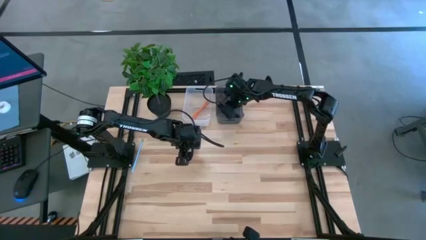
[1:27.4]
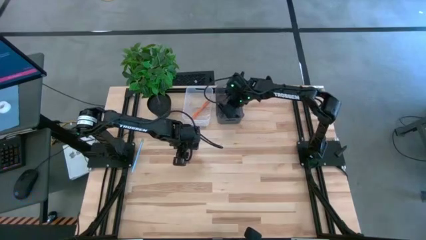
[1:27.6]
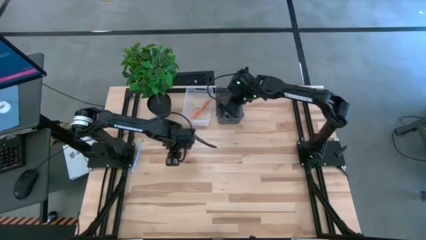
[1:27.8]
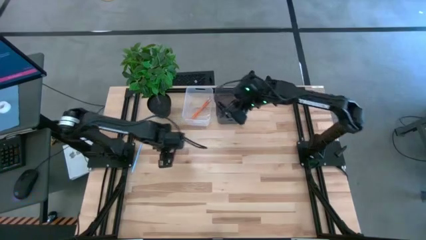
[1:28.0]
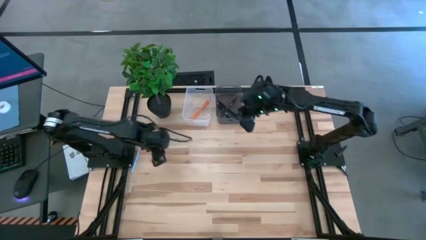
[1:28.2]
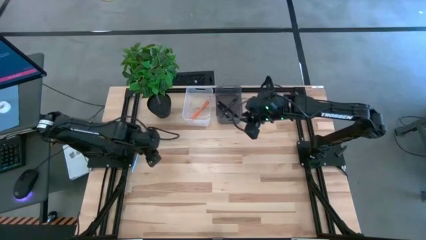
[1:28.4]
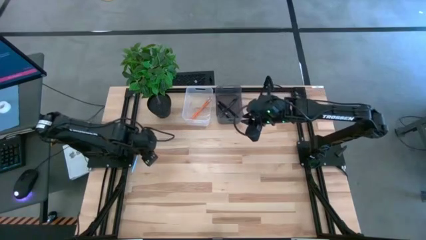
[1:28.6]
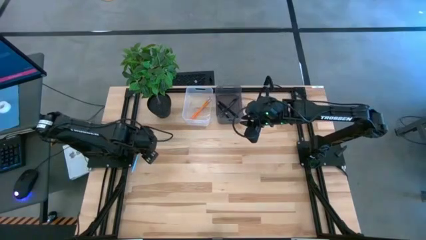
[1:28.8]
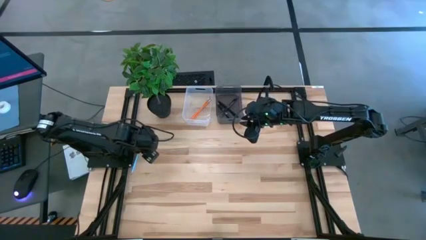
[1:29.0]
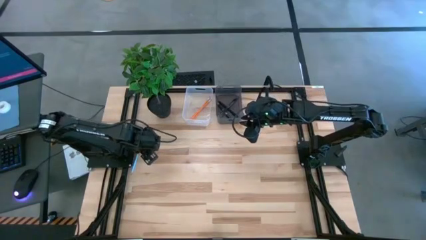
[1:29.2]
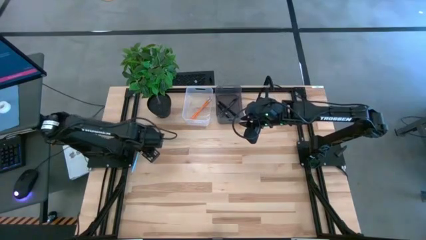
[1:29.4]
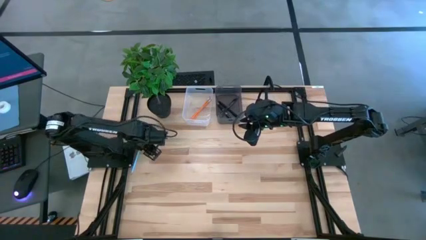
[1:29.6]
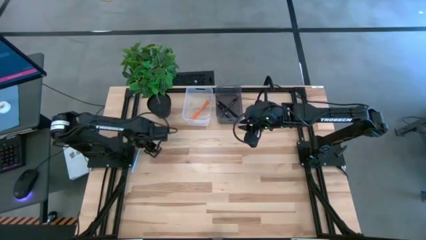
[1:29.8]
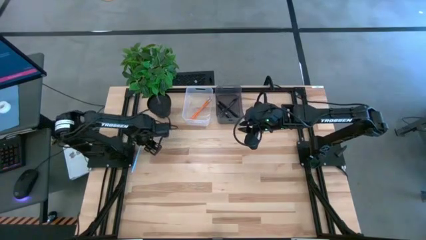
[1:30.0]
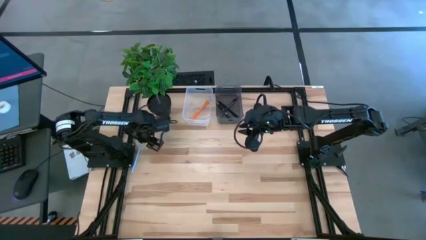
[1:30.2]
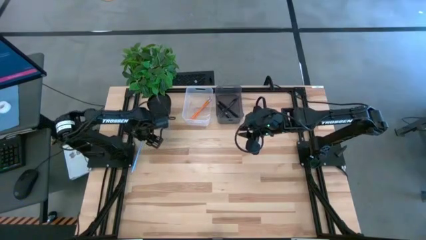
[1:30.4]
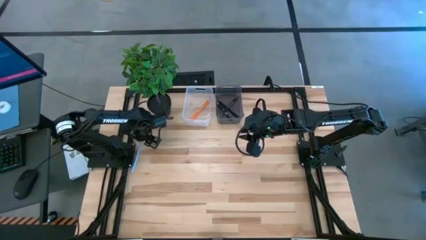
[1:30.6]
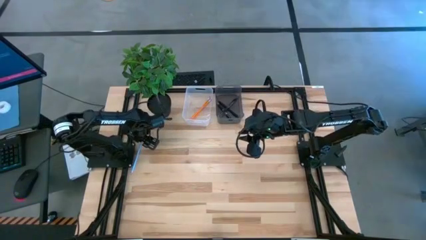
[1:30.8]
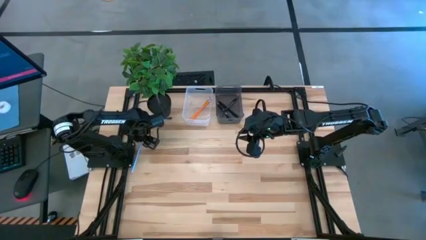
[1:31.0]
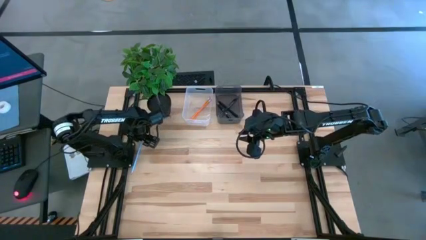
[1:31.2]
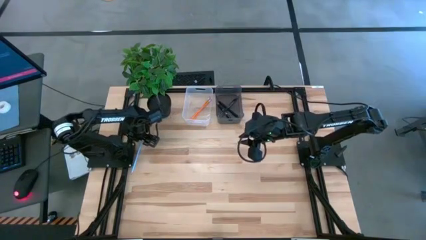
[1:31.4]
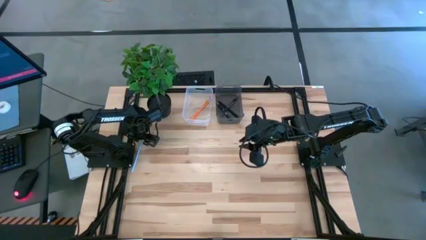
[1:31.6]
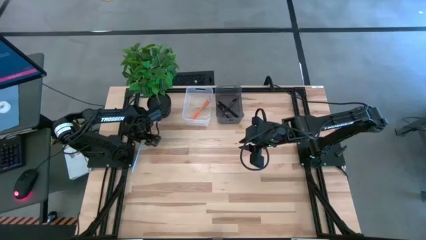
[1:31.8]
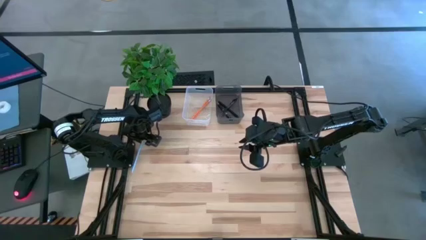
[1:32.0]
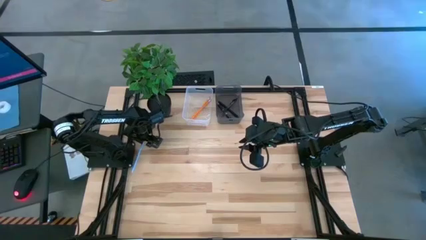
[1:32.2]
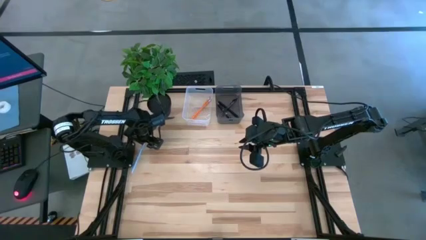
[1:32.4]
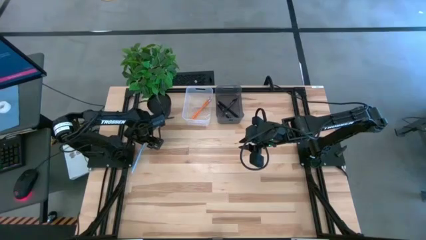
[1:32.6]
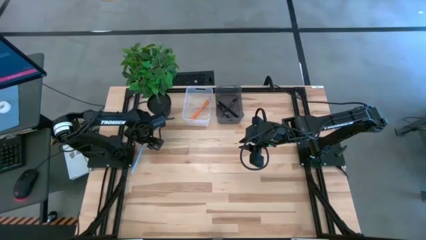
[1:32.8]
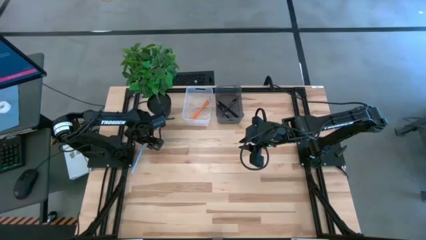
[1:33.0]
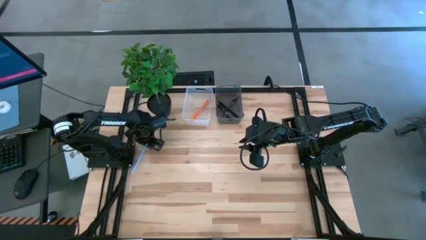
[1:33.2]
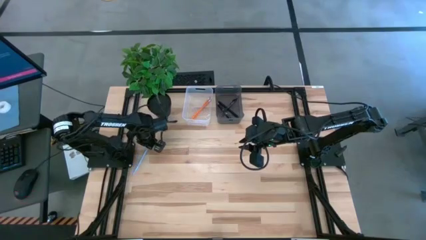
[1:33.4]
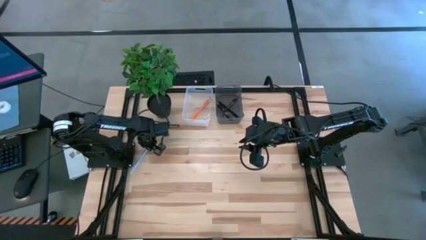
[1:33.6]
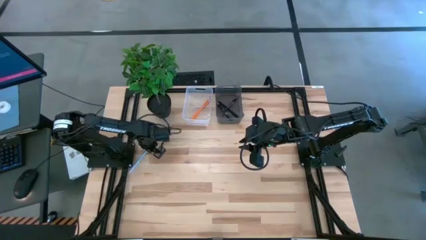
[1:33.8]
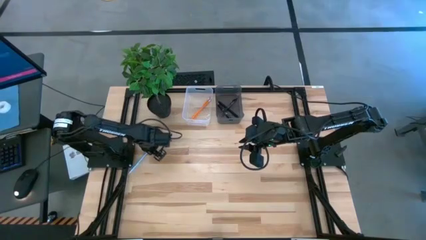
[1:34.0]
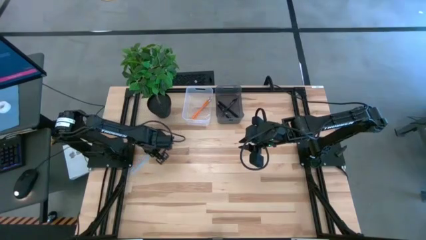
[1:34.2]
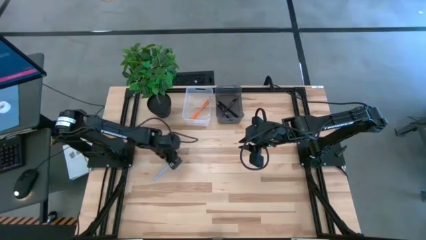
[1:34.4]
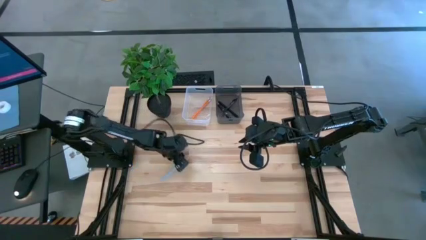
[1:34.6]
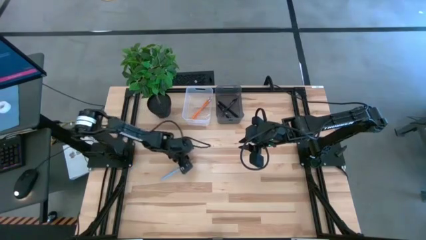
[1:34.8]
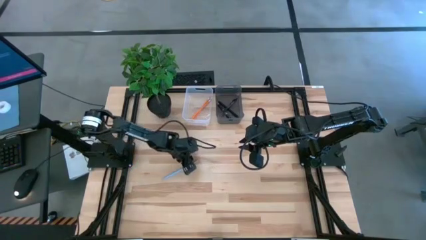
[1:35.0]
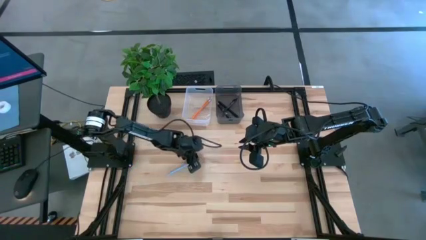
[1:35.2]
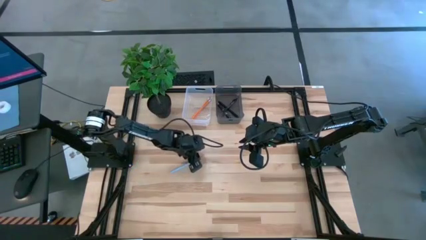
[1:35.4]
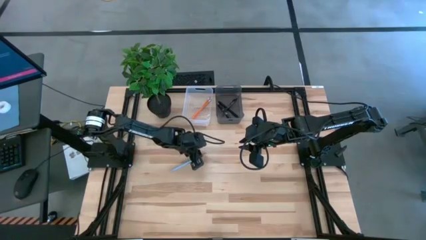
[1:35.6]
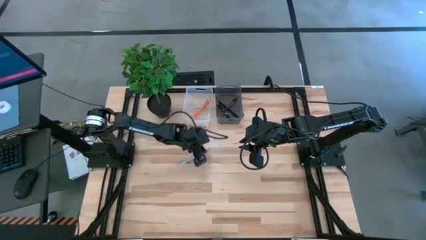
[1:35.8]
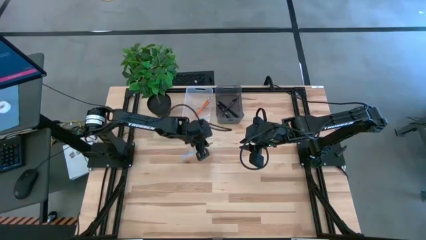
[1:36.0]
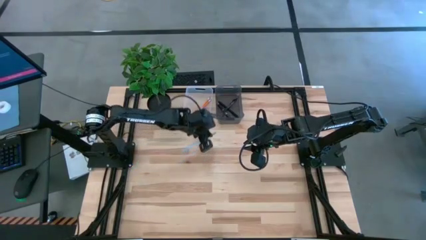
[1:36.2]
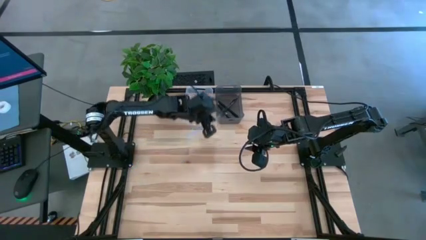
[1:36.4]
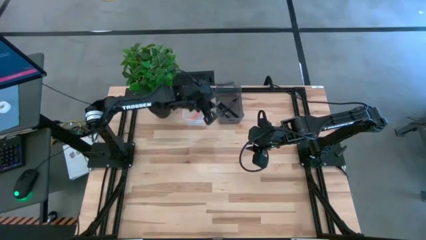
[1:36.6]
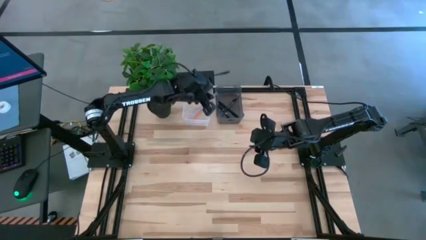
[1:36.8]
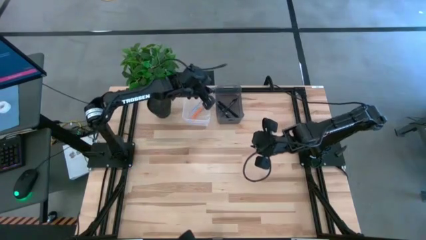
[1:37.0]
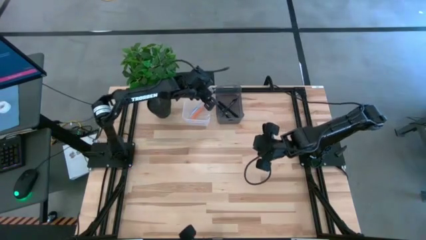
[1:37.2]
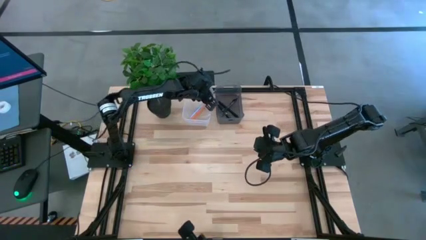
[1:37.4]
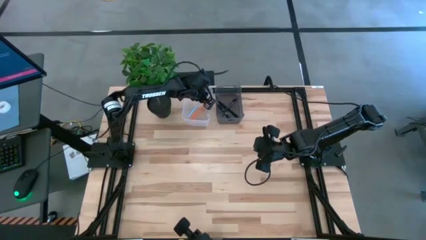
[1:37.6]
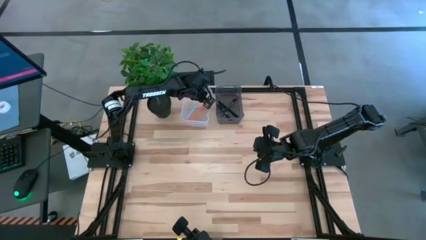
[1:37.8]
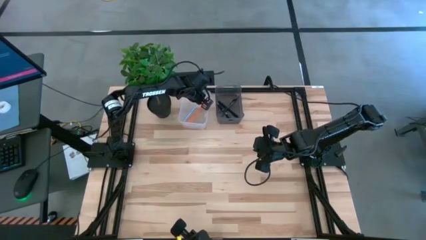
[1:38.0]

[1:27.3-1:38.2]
Task: Sort pens & pencils
Put the blue pencil into the transparent bin

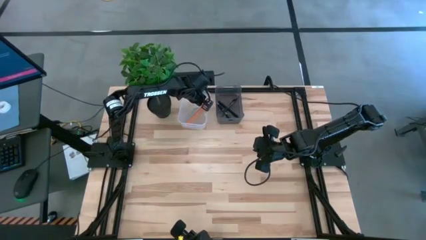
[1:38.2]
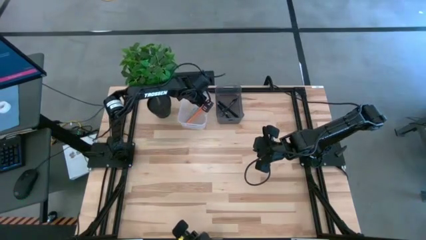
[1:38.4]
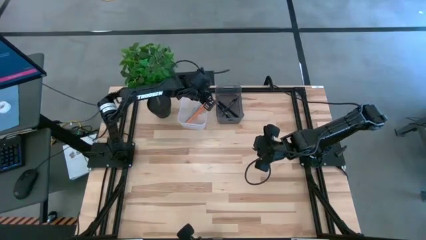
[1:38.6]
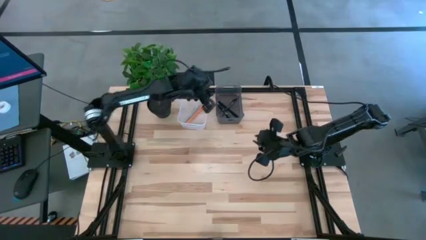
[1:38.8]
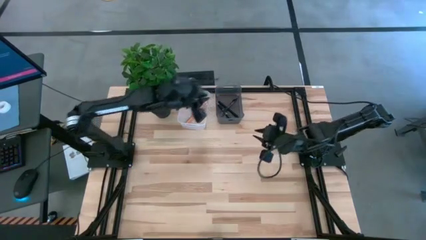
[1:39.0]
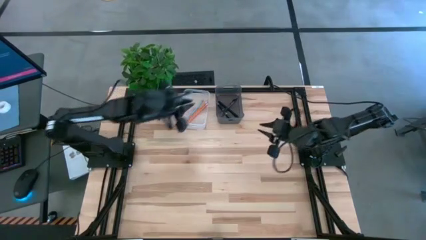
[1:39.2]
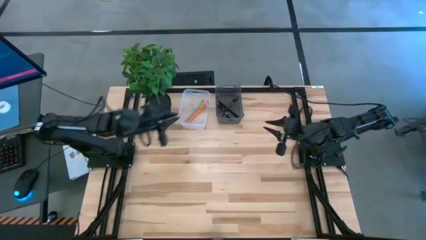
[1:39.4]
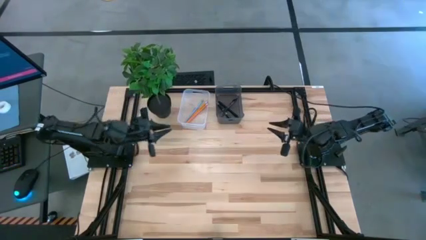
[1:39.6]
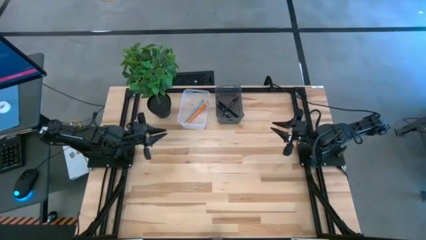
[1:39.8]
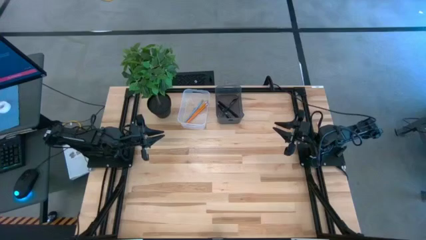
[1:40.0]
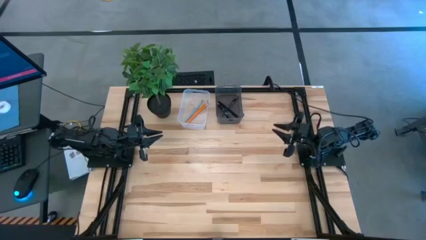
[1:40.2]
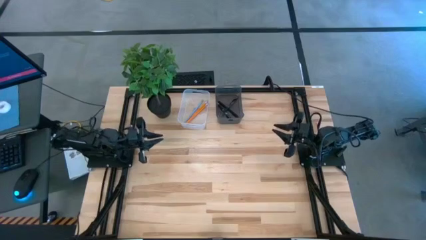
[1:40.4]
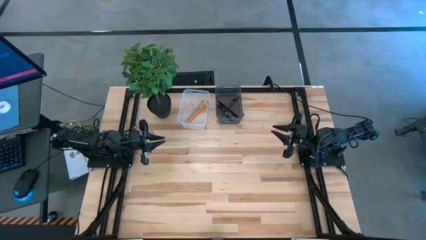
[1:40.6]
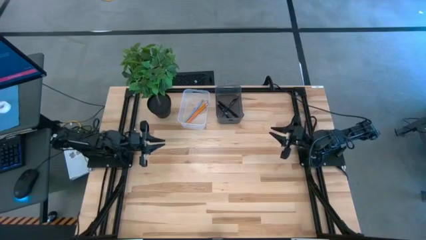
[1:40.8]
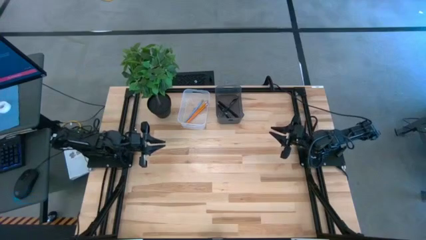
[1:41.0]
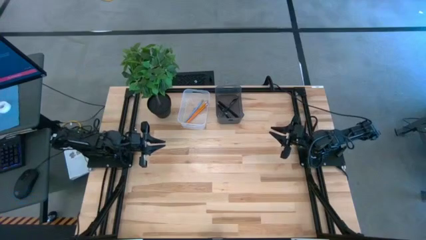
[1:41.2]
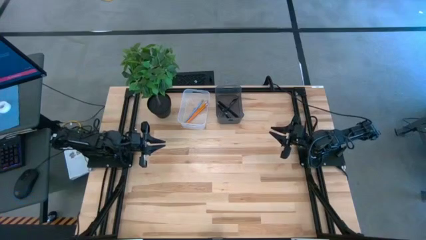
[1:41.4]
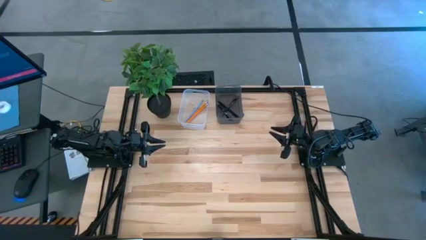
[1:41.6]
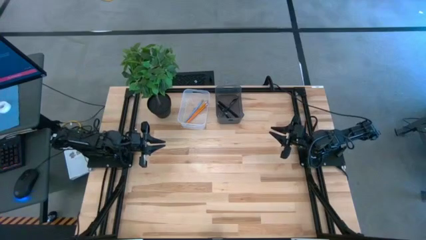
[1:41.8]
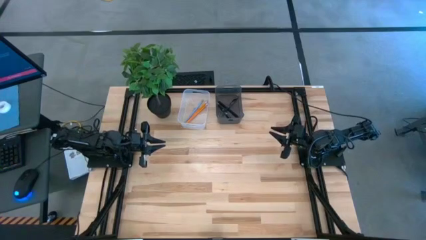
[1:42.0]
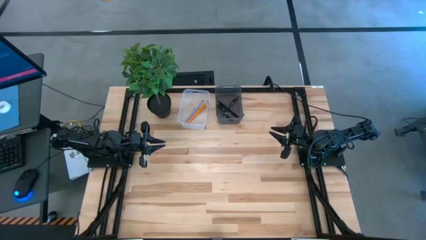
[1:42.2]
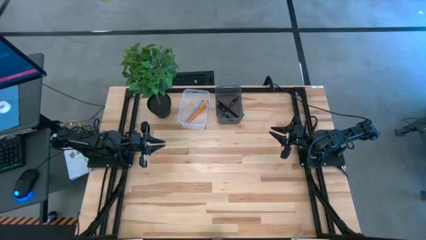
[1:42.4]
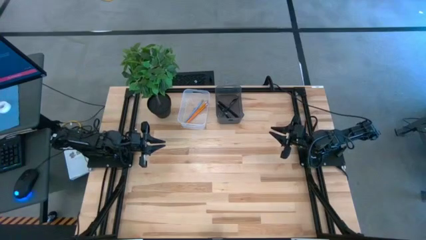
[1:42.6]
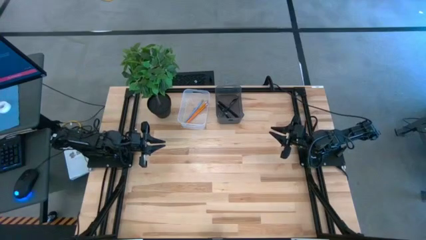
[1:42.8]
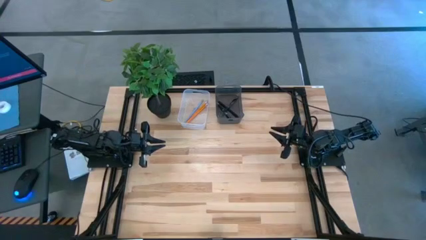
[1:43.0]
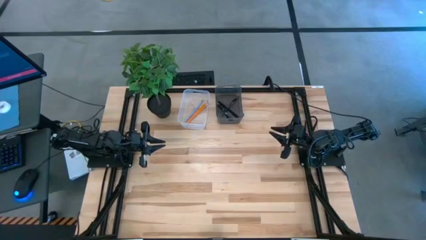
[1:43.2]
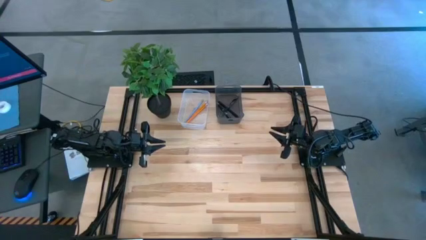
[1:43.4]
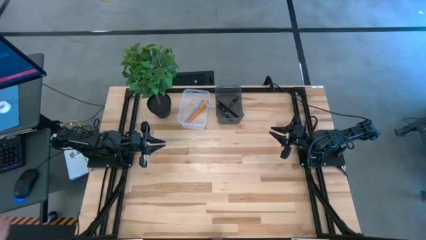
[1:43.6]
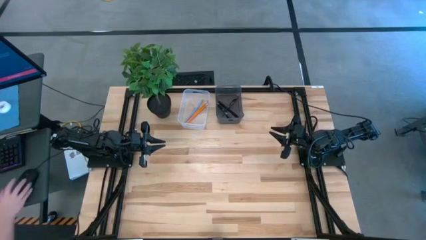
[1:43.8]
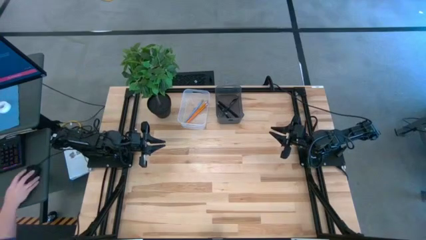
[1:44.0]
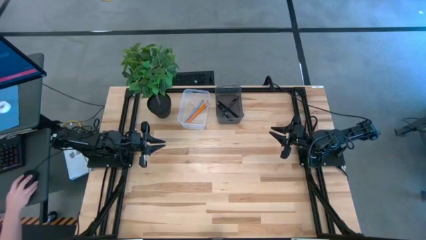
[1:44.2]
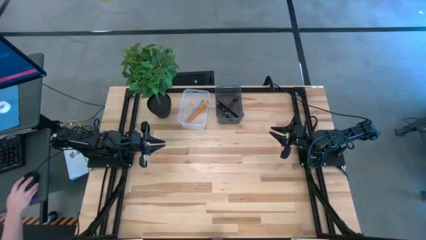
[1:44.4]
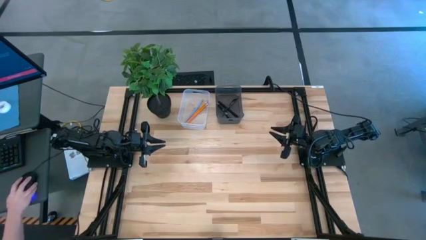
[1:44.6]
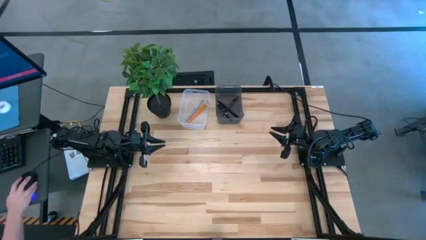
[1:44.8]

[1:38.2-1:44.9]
Return to Home Position
